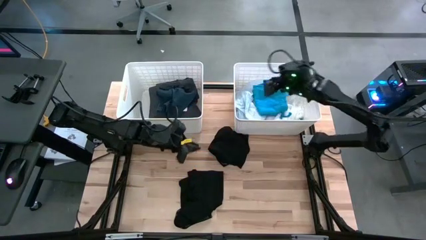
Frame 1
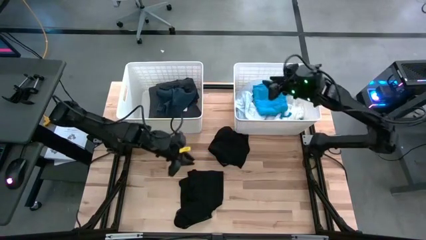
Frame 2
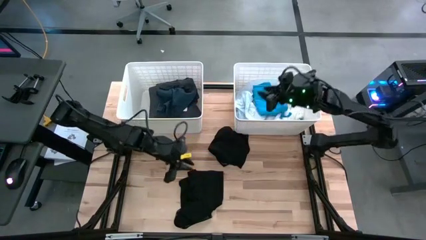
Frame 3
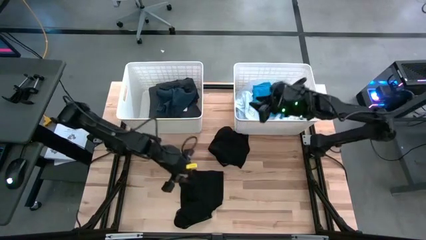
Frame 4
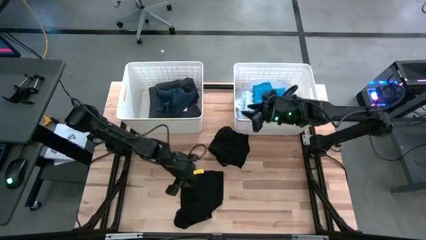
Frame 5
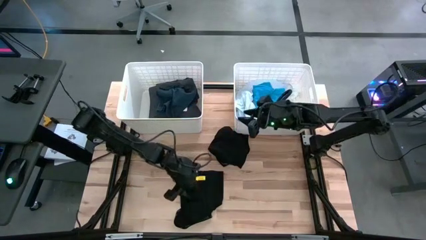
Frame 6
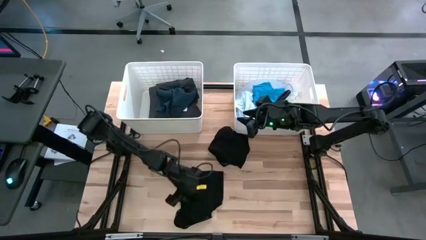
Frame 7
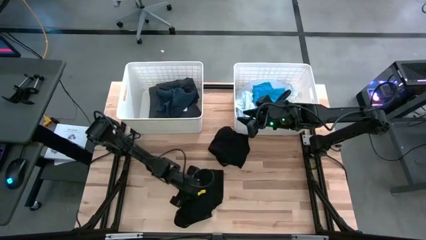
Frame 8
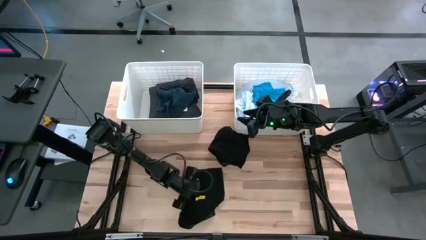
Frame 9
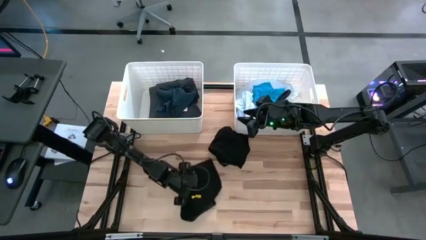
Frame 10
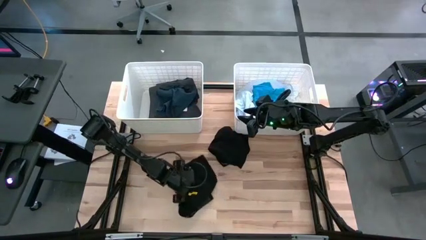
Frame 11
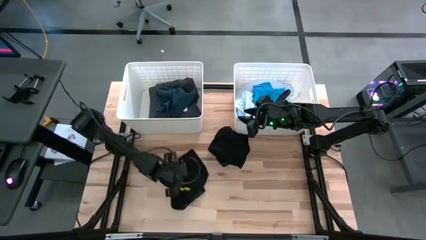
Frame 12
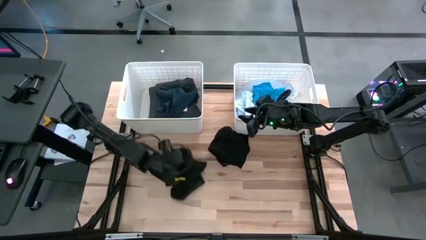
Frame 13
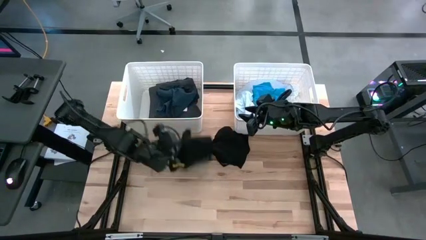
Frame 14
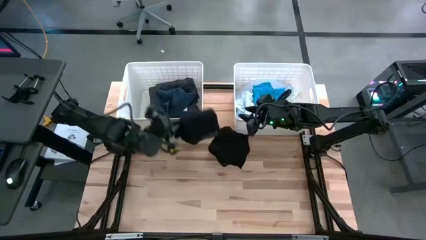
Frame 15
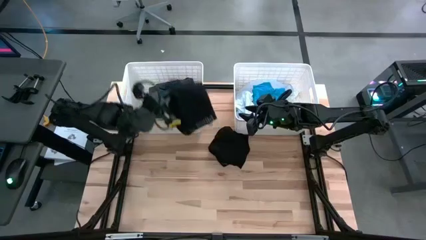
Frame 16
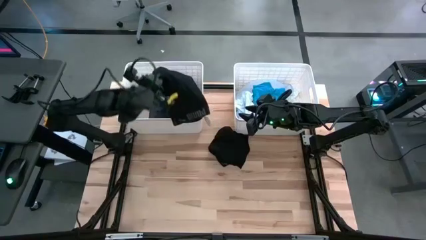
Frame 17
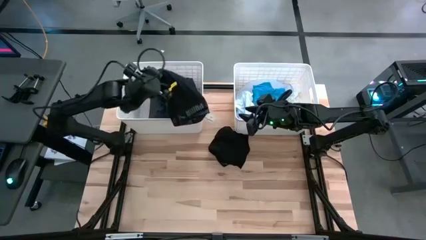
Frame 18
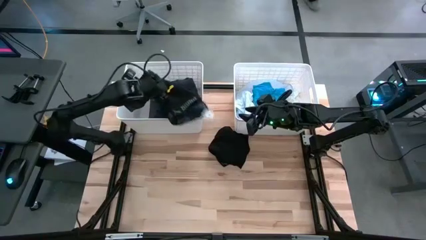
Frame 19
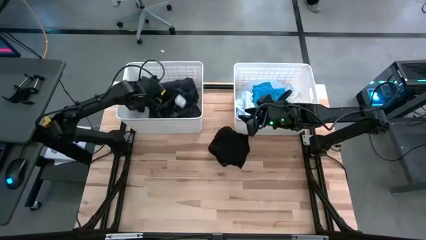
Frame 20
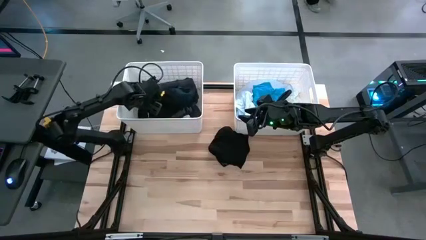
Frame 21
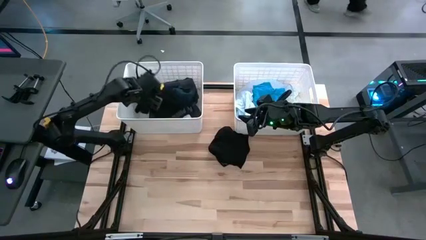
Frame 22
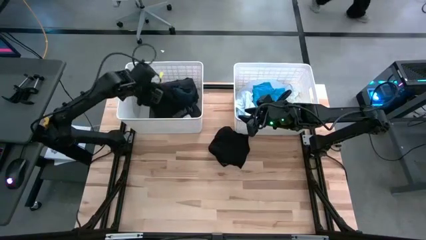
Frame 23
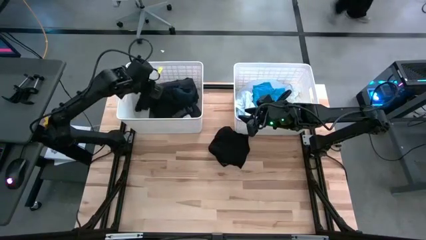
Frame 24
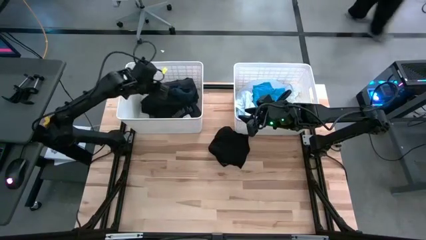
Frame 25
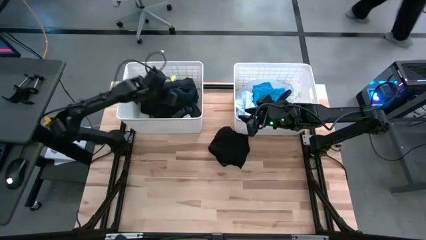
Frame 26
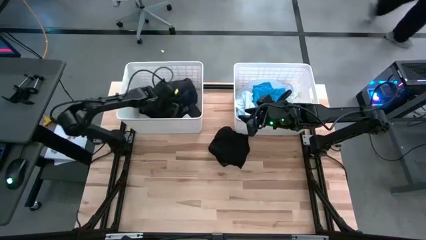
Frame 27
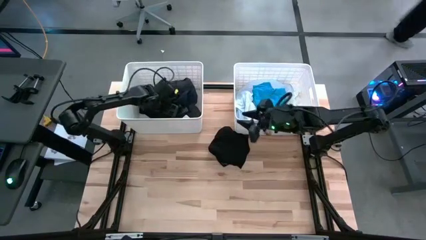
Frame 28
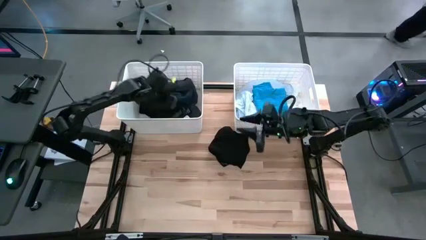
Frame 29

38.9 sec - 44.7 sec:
Task: Sort clothes
Put the black underwear into the left bin

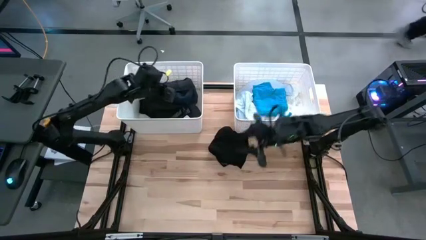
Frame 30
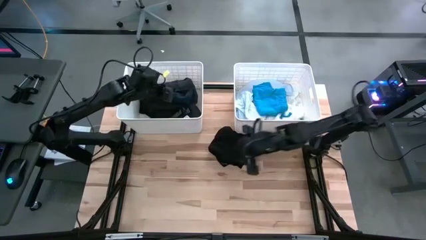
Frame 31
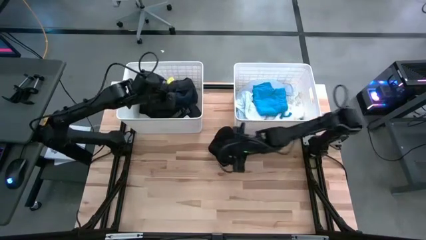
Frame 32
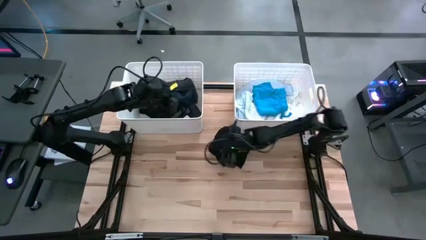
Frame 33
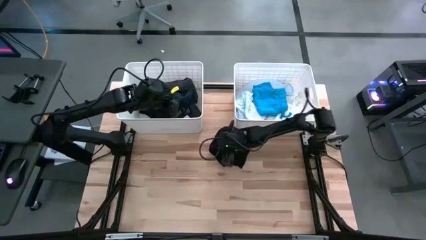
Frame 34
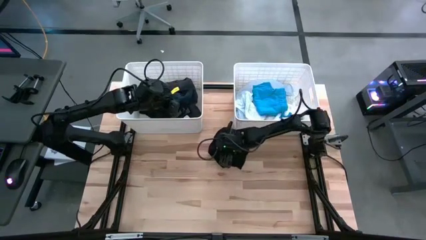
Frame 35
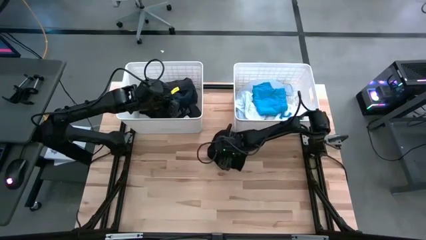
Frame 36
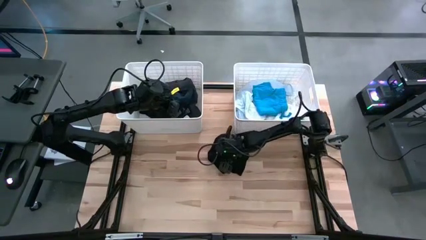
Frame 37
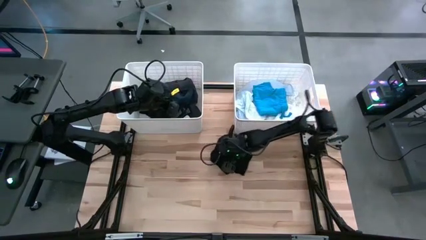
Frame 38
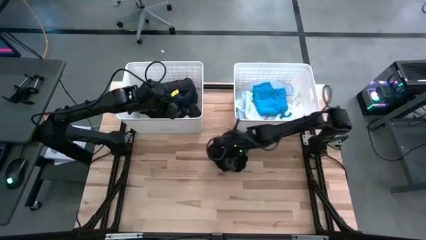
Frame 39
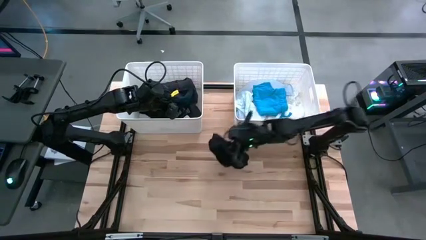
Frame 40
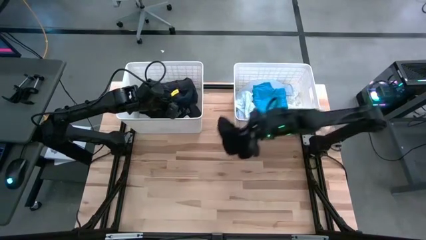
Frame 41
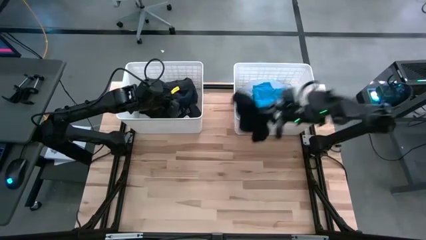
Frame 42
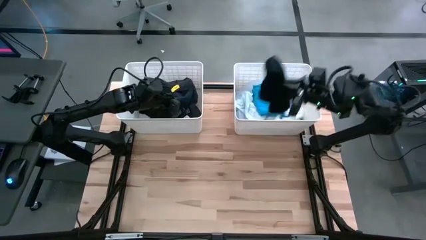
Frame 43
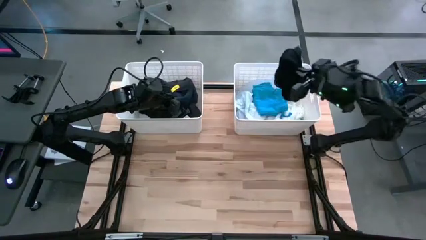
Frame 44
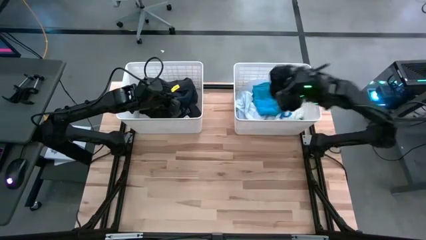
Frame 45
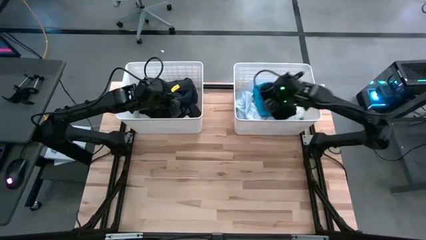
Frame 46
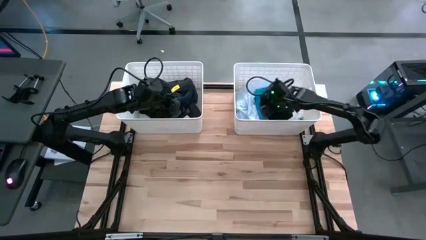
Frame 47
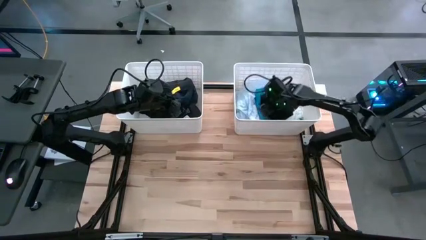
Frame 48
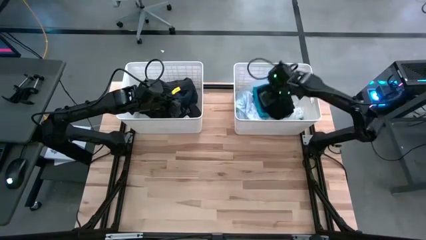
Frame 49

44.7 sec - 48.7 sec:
Put the black underwear into the left bin

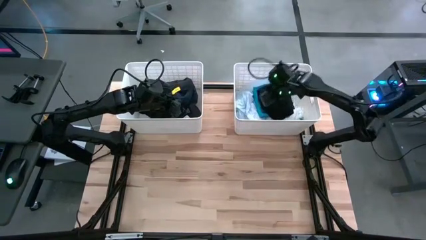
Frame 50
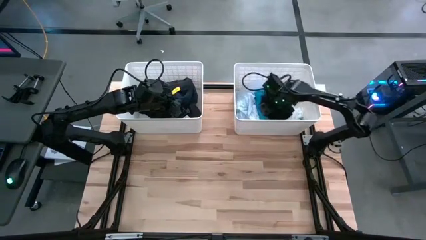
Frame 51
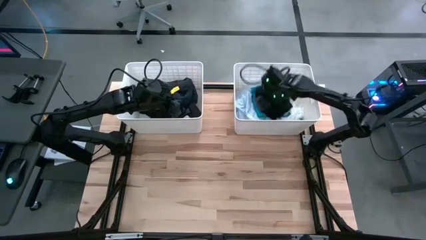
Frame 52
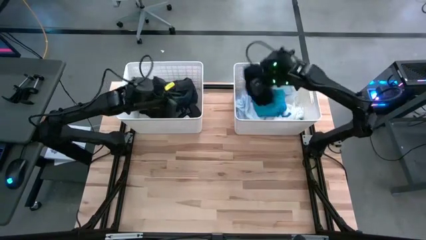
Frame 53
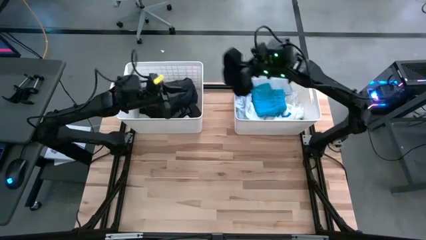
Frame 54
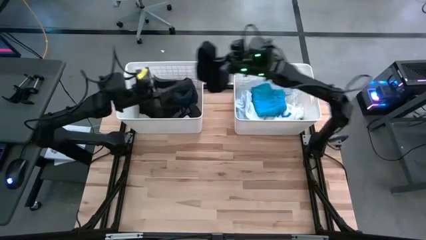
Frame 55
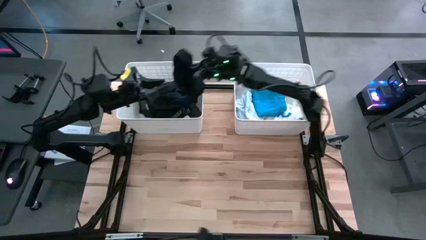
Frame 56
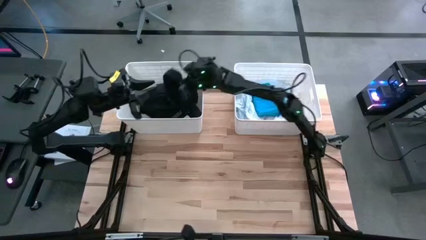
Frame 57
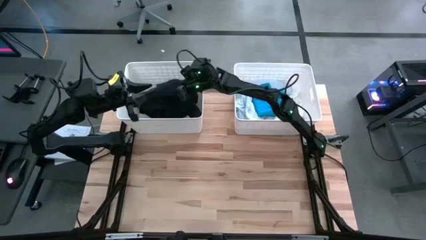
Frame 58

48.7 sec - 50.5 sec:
Put the black underwear into the left bin

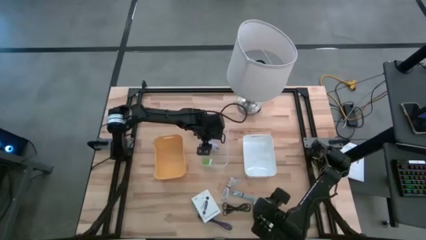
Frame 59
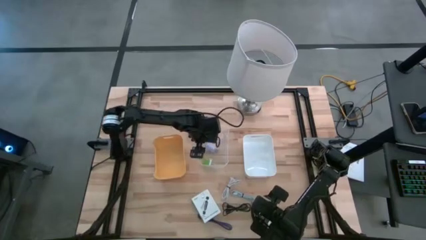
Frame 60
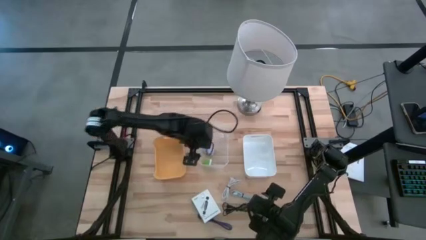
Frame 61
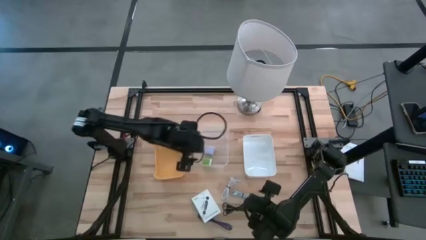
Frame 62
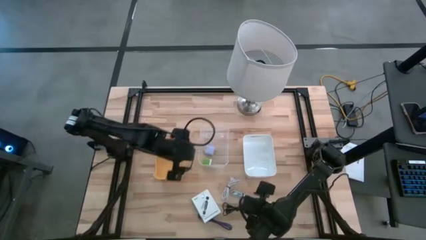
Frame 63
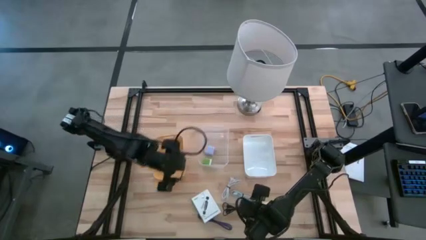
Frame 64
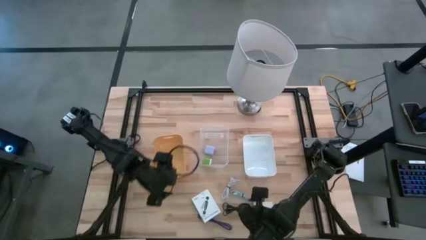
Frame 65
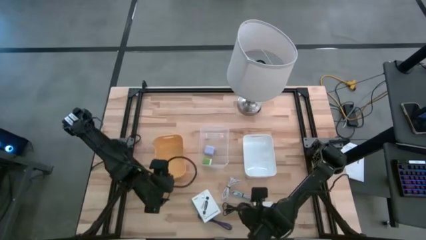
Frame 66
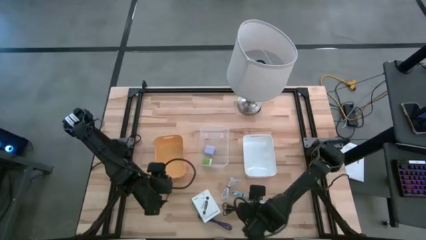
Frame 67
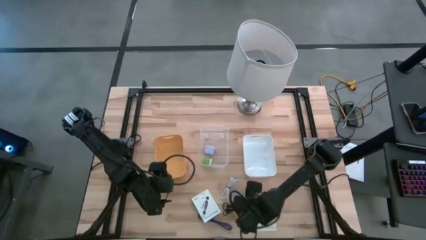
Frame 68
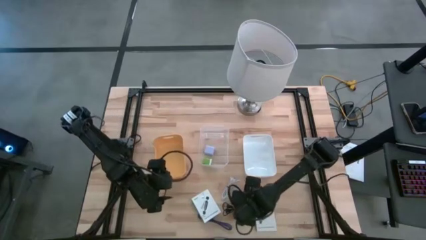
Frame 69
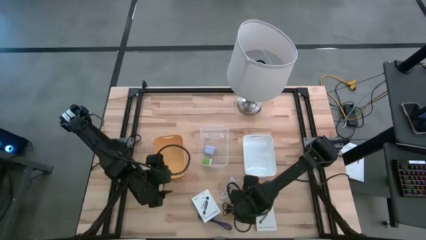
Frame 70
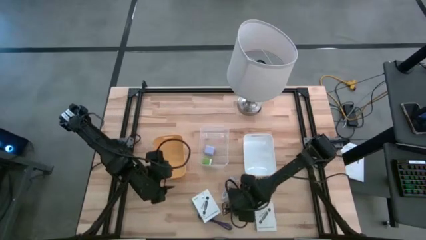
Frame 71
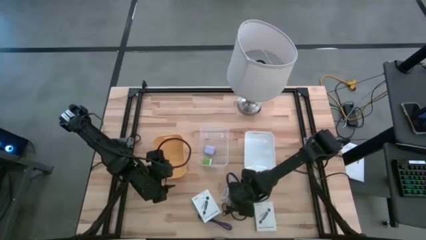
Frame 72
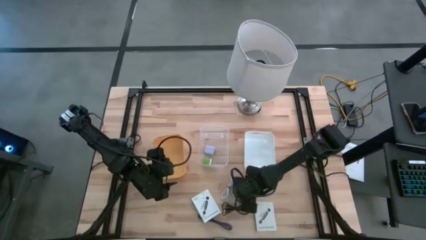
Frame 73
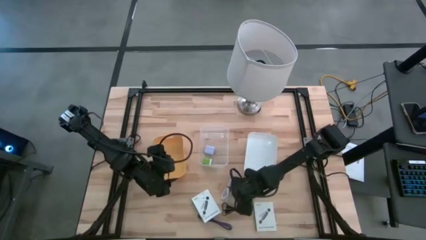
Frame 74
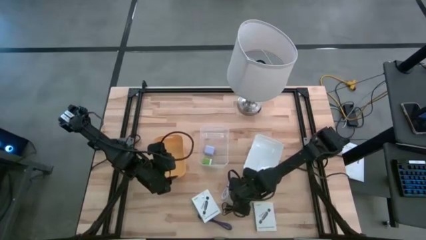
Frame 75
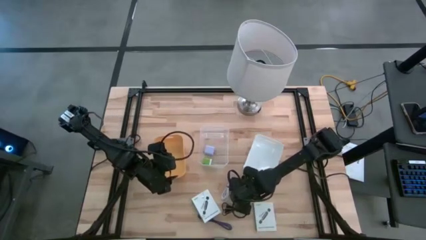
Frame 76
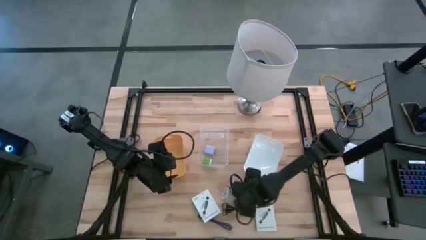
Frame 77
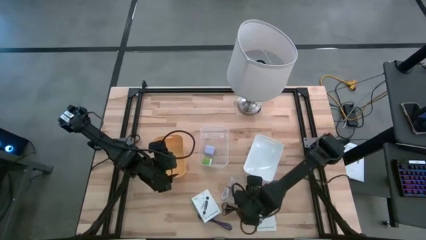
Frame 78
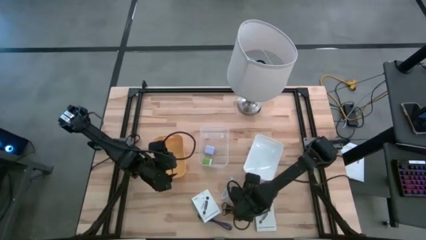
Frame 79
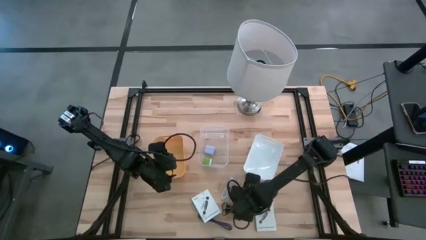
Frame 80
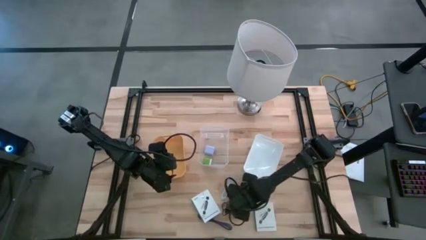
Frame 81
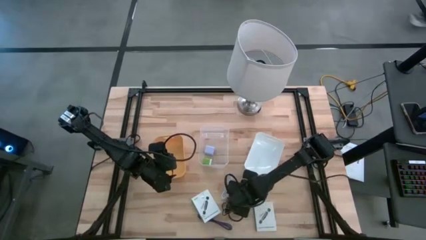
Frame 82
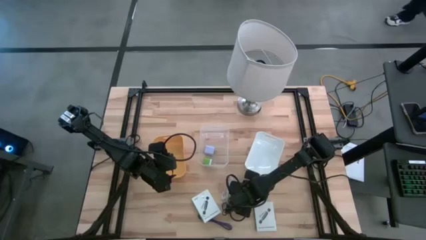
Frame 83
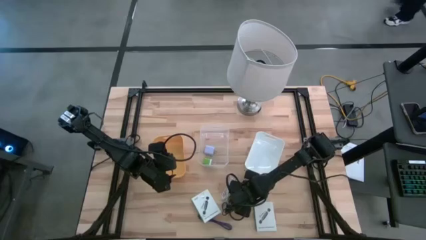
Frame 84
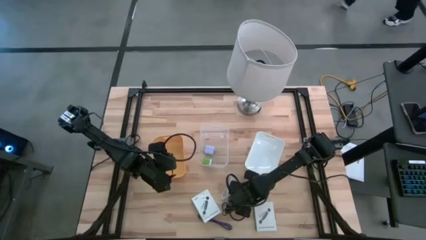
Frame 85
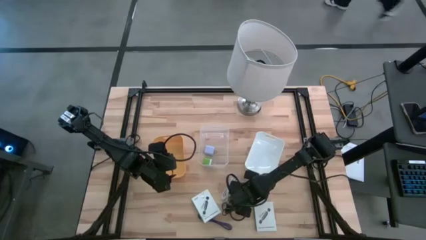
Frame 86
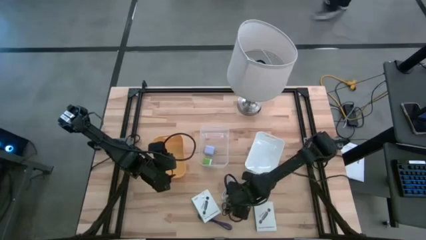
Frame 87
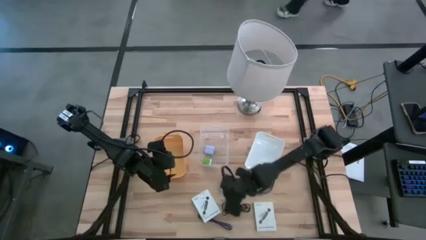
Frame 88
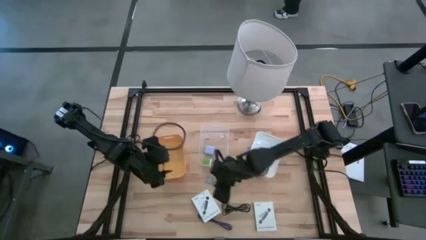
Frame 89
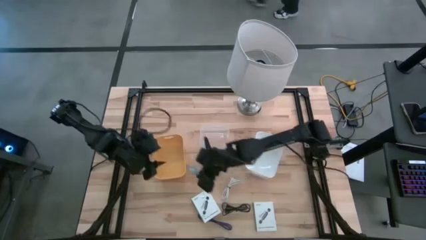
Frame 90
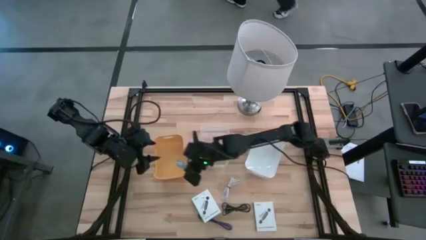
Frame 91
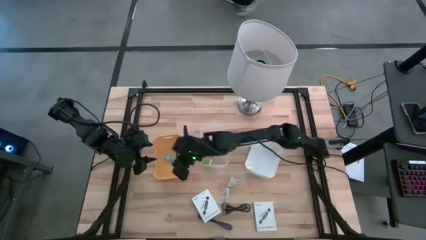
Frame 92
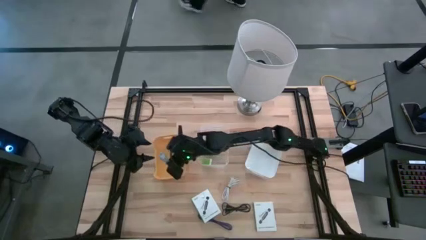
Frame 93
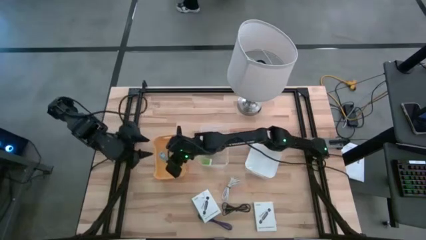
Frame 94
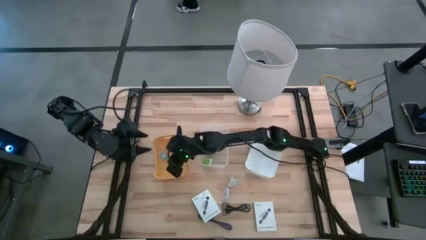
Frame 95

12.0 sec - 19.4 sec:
Task: Pick and place items into bin
Put the light blue charger cable into the yellow bin
